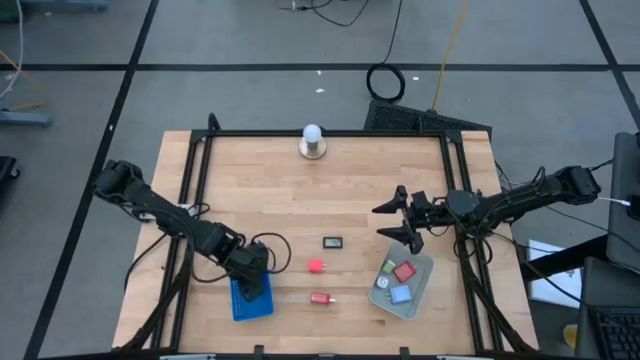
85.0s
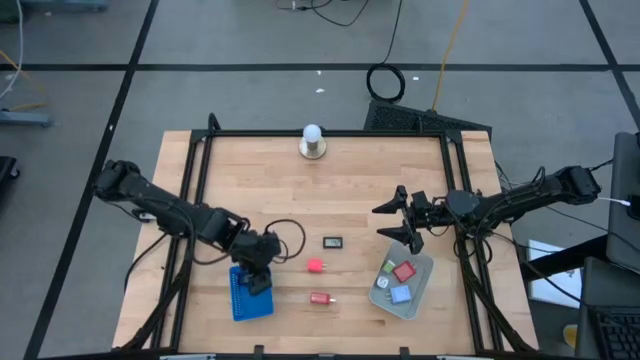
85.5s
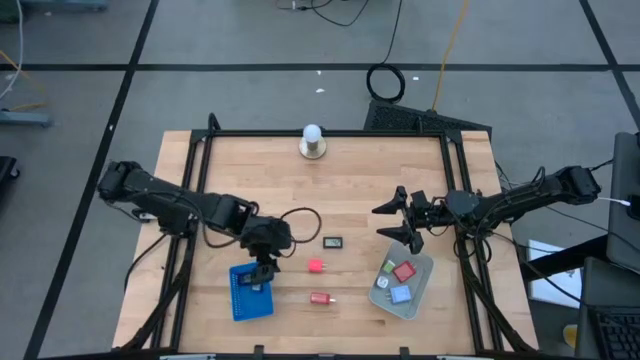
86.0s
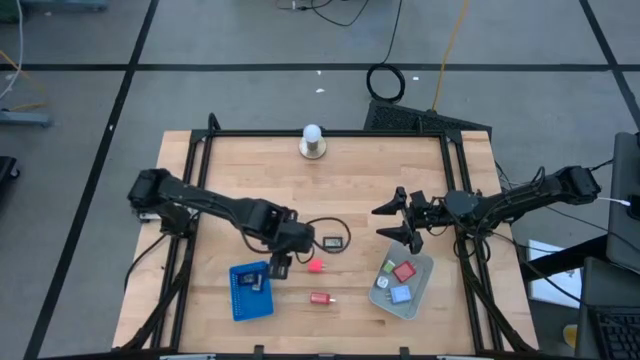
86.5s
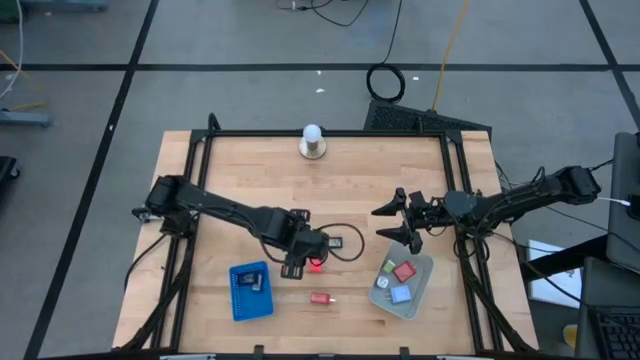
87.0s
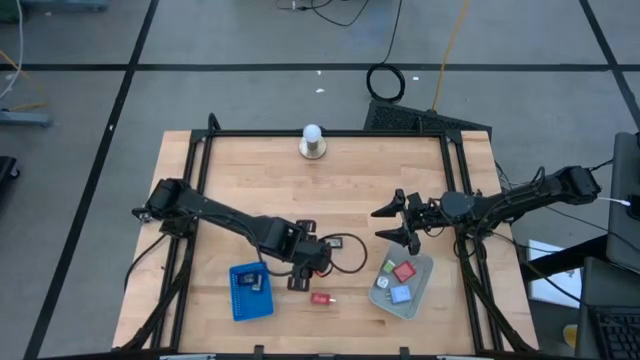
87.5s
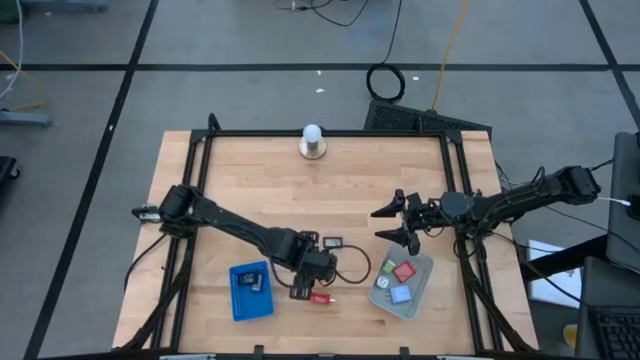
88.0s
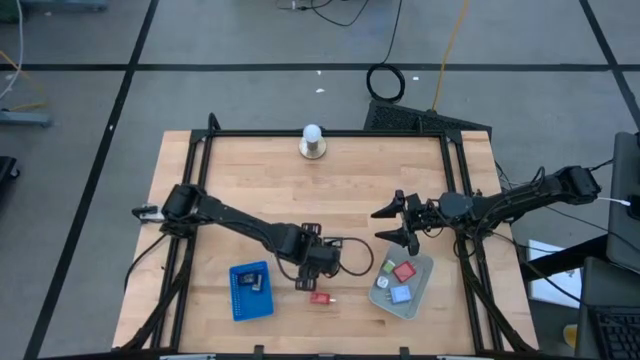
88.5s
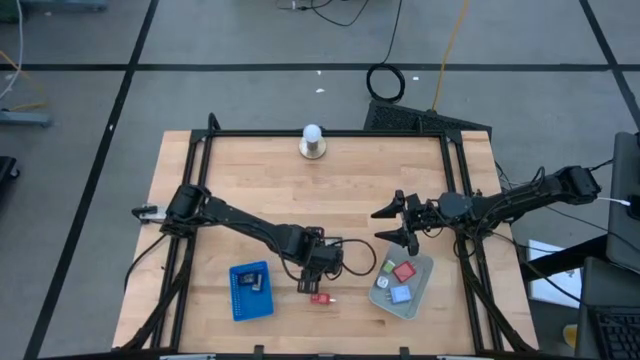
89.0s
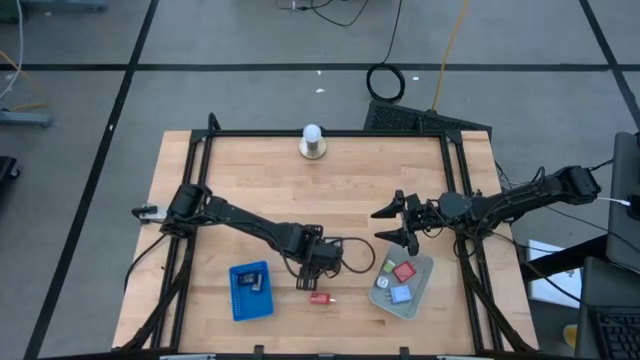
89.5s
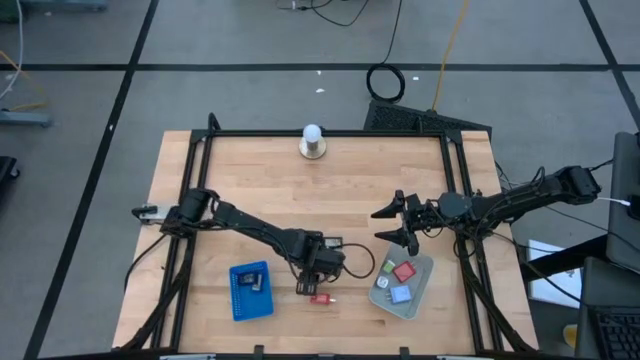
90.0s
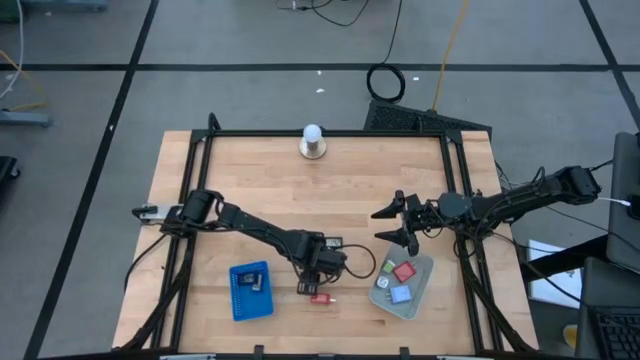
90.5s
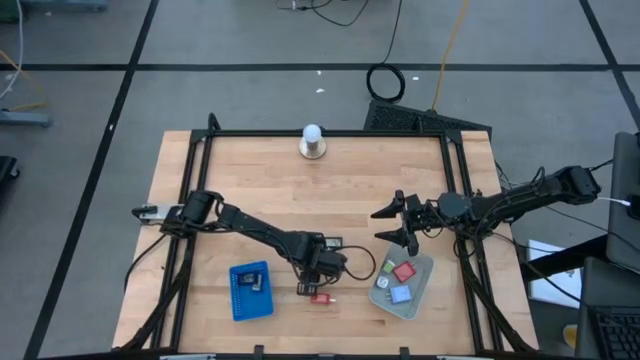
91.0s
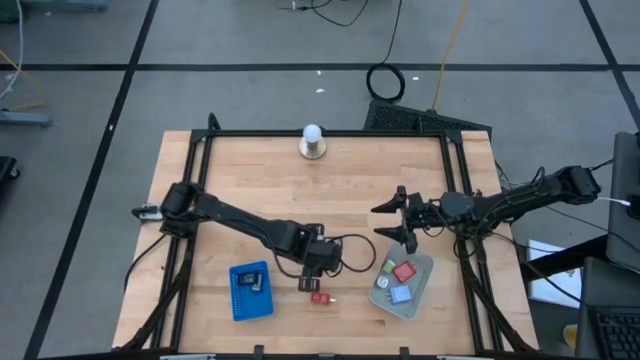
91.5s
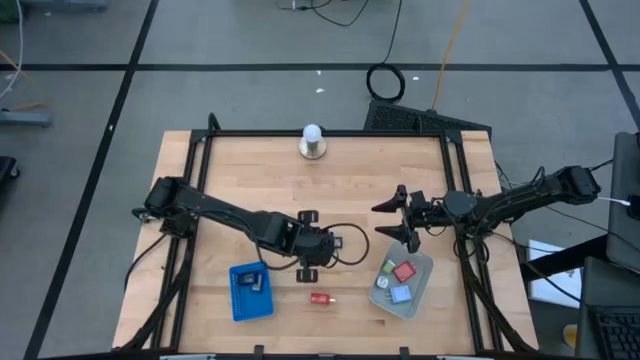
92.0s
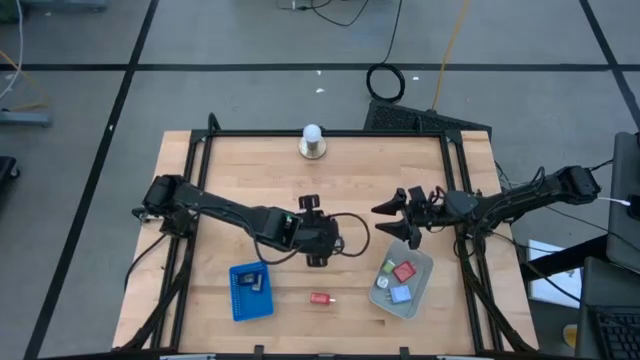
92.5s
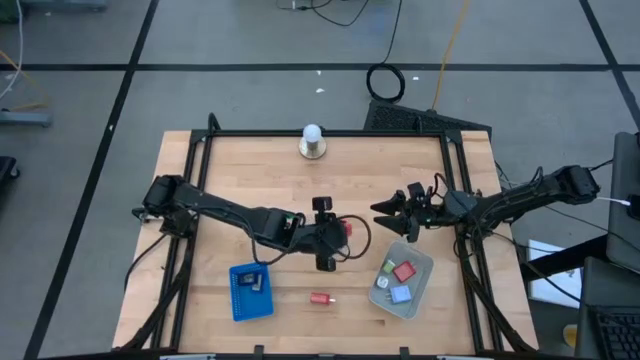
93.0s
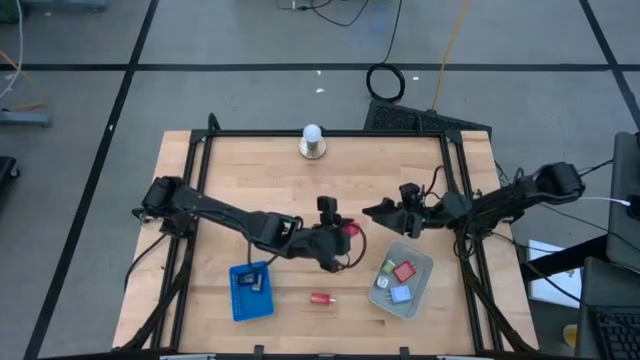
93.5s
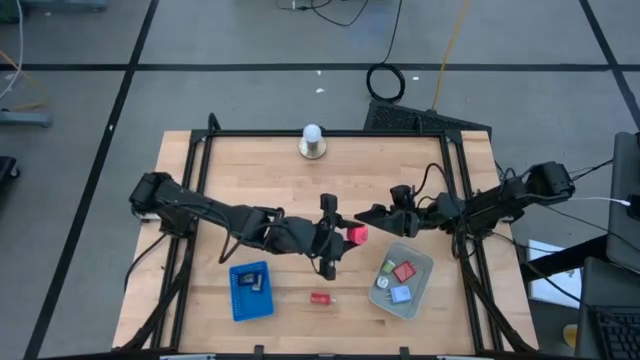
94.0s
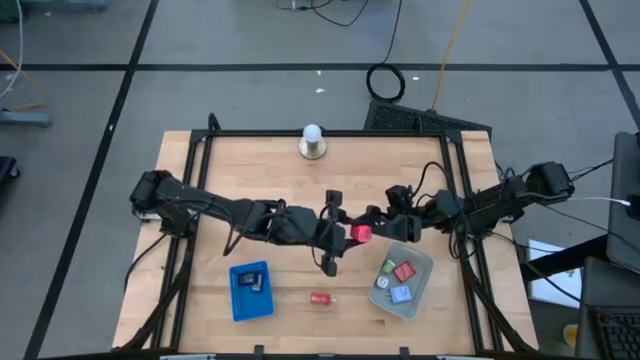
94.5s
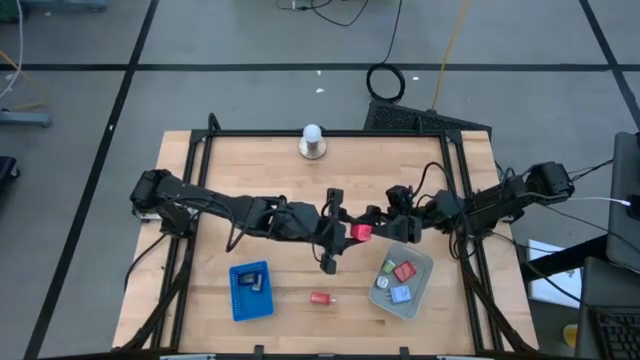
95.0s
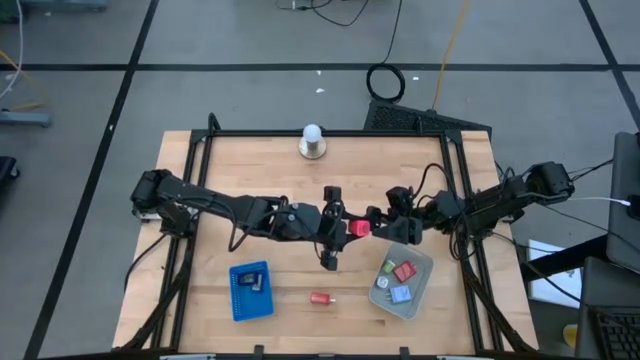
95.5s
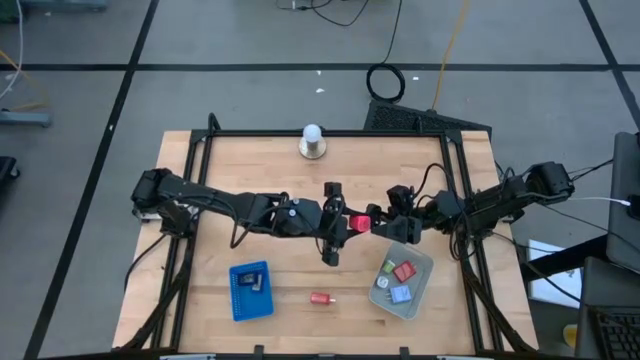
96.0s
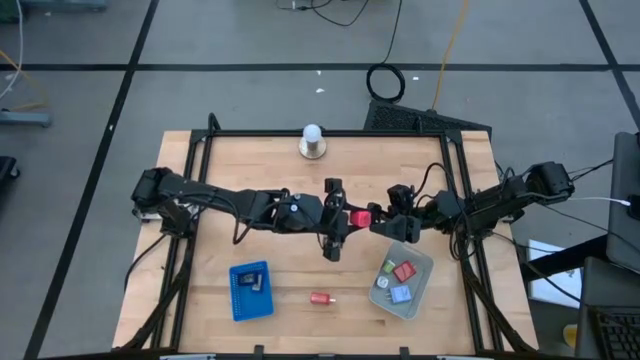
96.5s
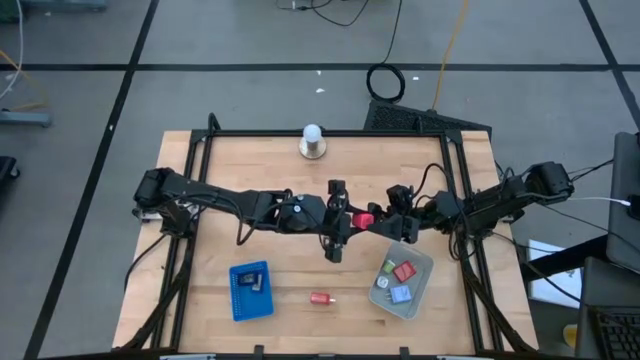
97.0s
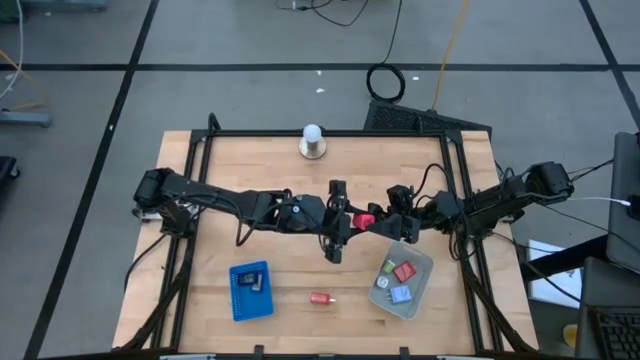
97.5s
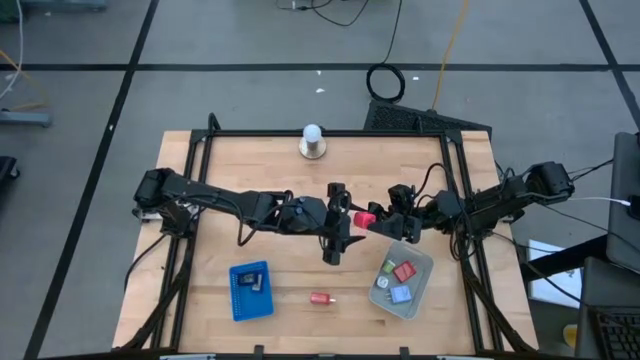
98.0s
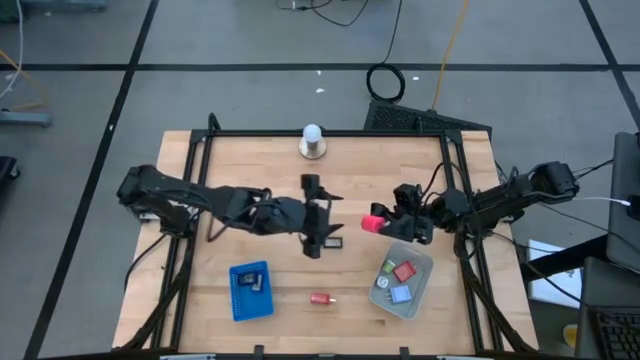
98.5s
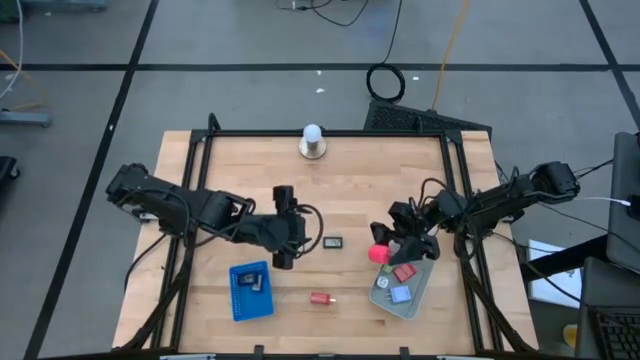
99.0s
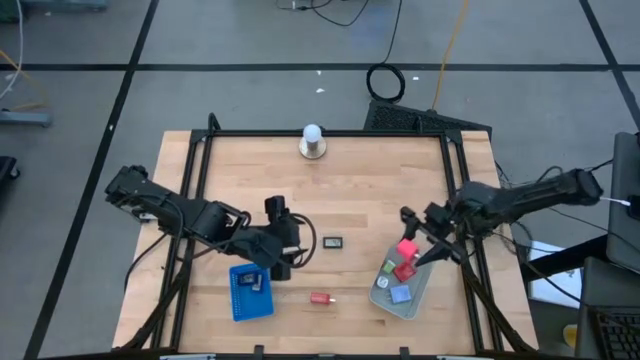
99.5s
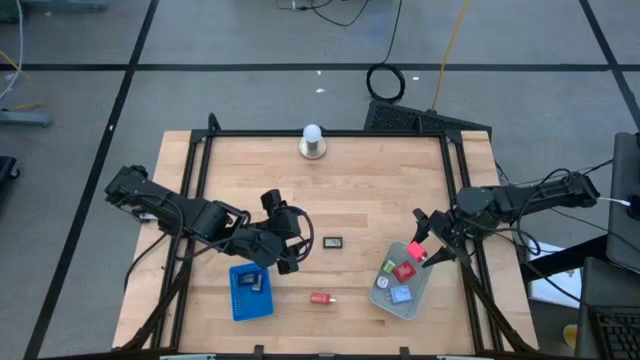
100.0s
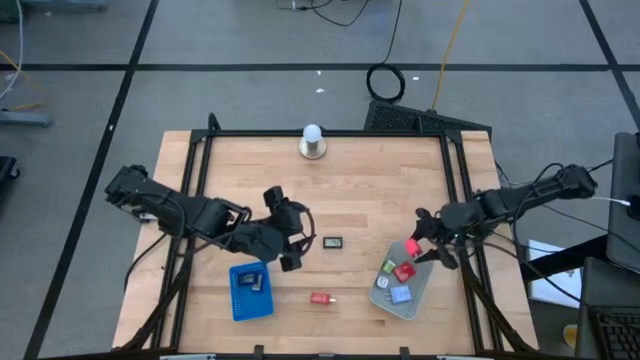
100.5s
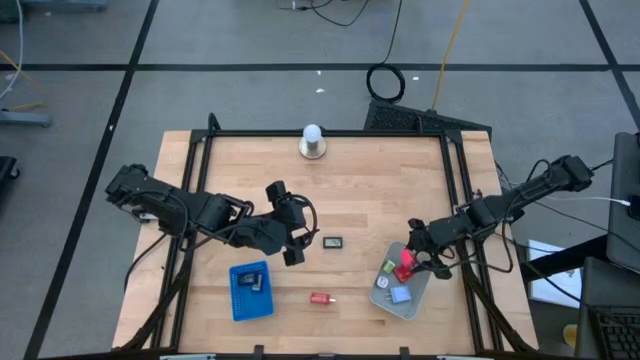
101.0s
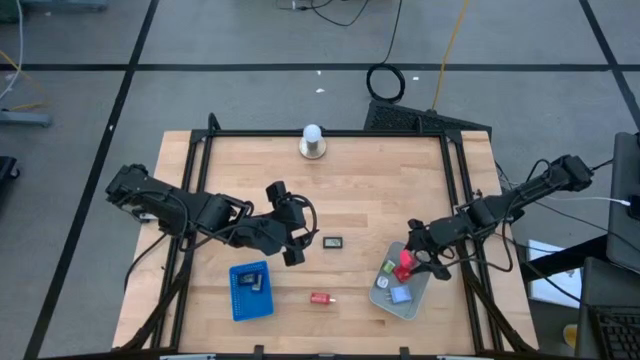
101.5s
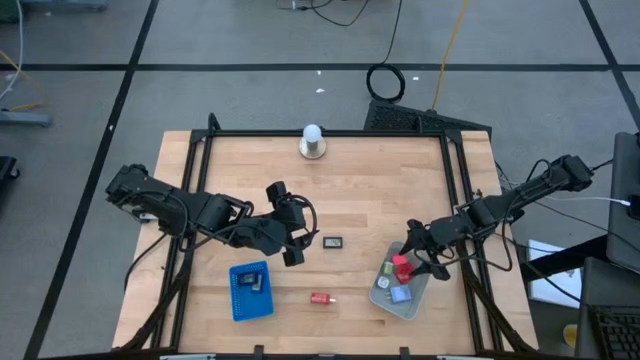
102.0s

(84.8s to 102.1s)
Task: Pick & Place Office items
Put the pink charger adapter into the gray bin

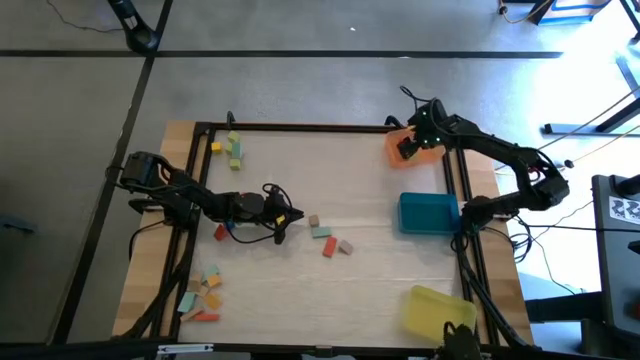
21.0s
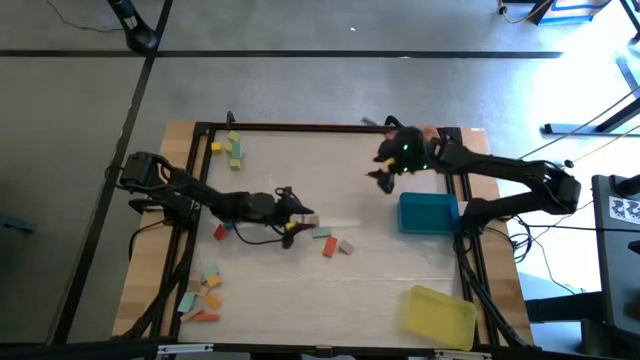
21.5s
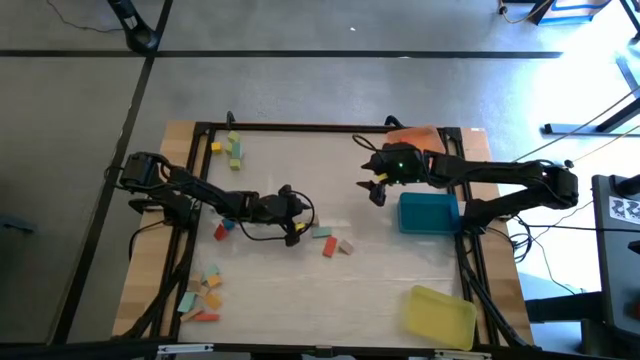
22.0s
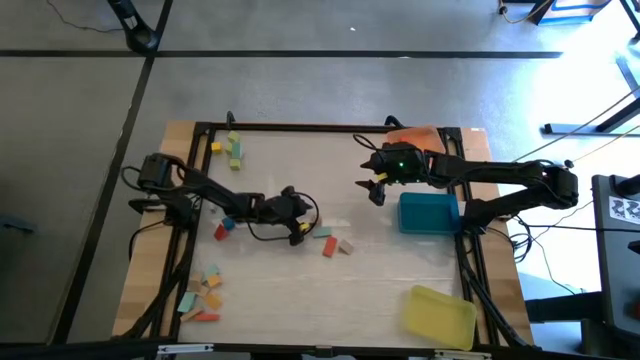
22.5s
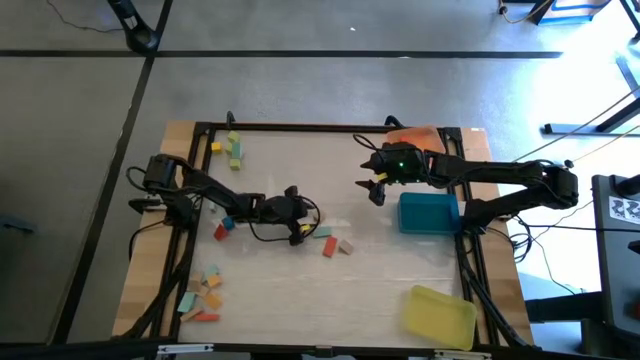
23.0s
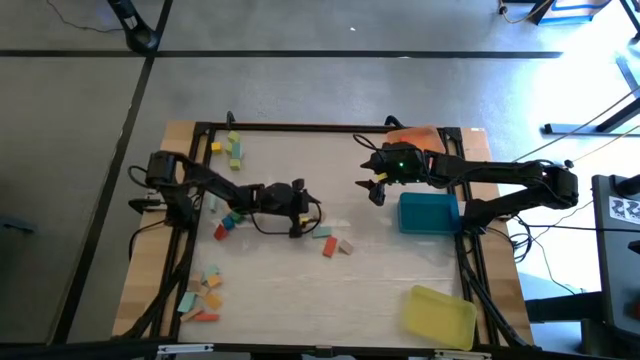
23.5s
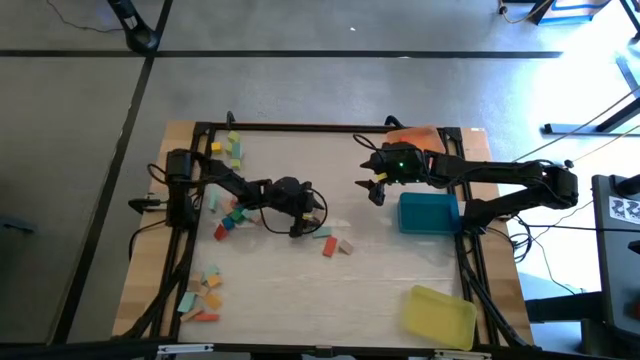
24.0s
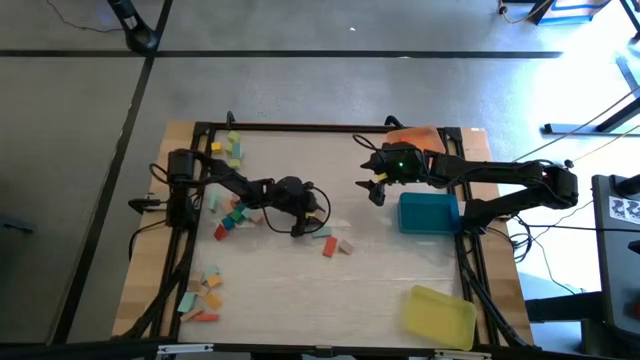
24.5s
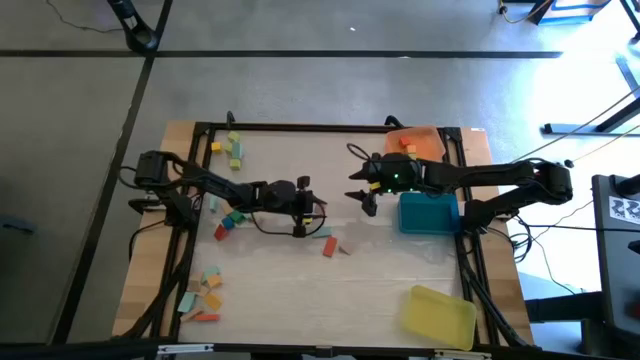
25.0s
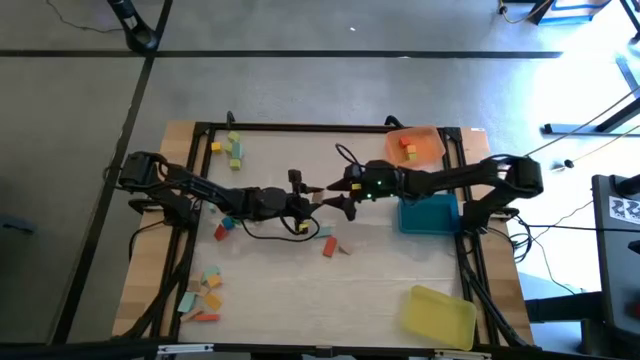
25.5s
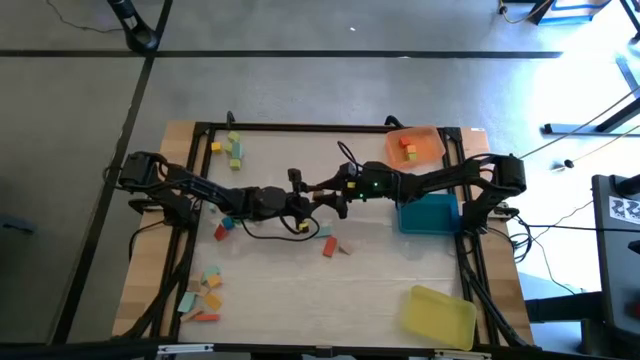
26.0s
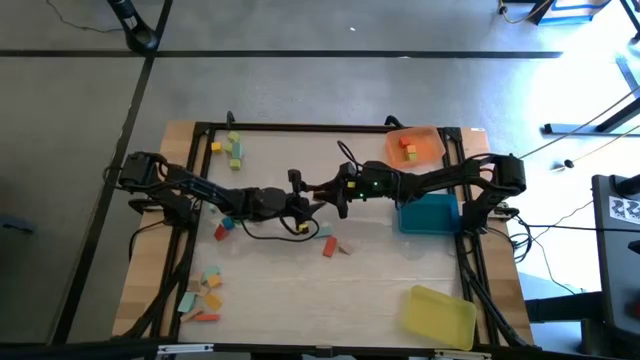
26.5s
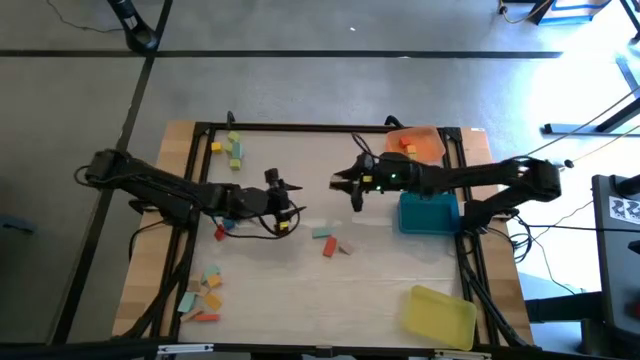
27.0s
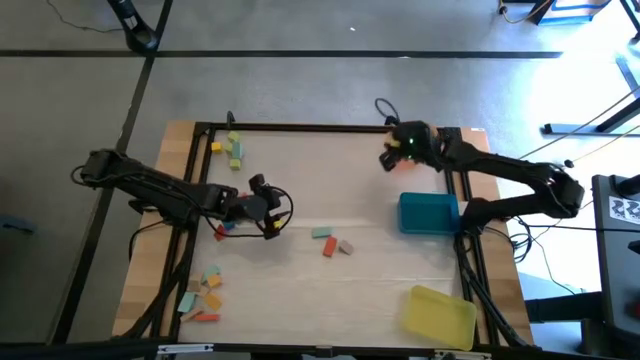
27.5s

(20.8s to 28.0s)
Task: Sort blocks by size
Put the brown cube block into the orange bin
